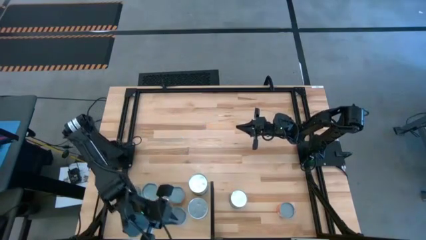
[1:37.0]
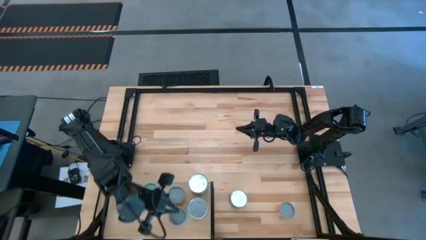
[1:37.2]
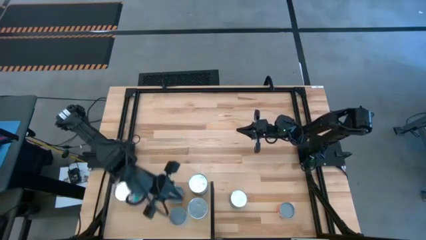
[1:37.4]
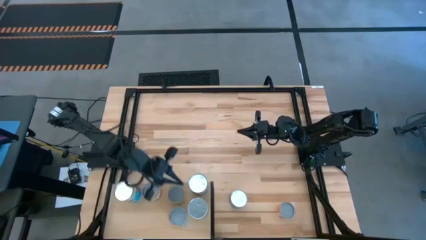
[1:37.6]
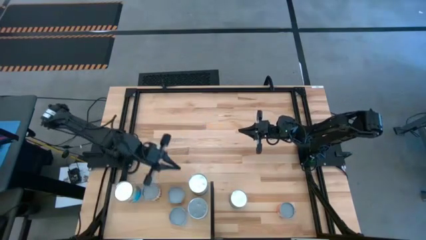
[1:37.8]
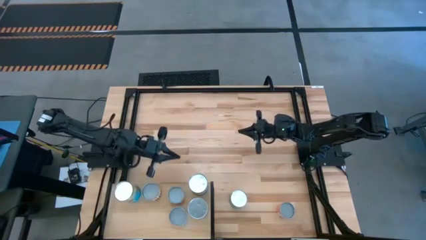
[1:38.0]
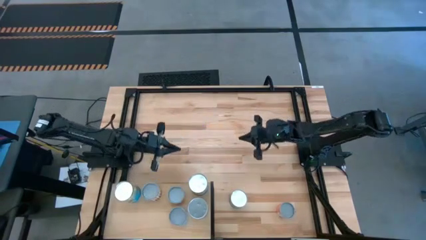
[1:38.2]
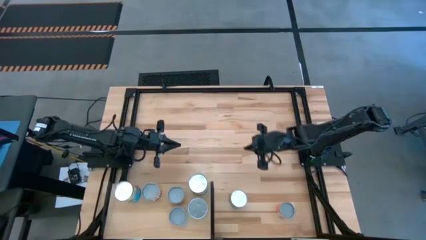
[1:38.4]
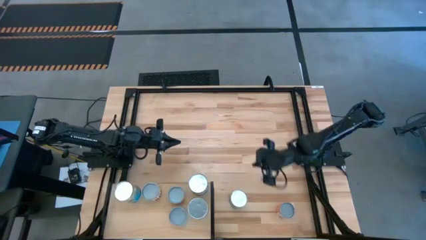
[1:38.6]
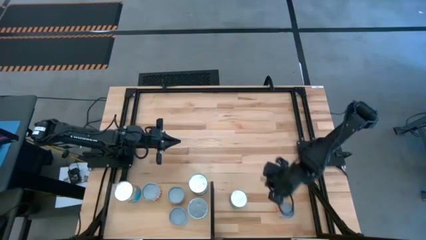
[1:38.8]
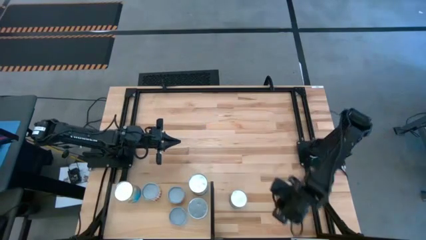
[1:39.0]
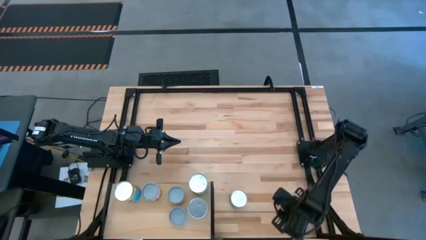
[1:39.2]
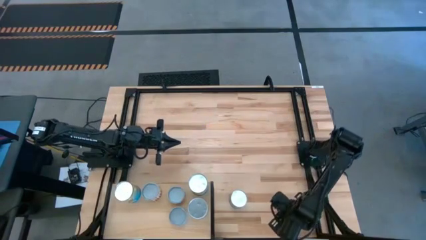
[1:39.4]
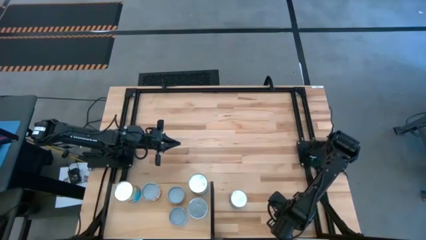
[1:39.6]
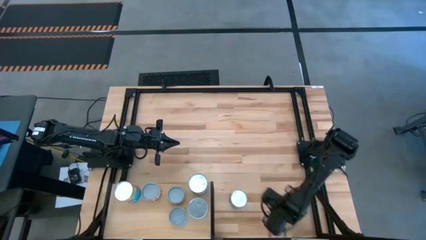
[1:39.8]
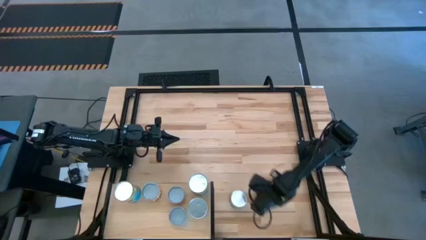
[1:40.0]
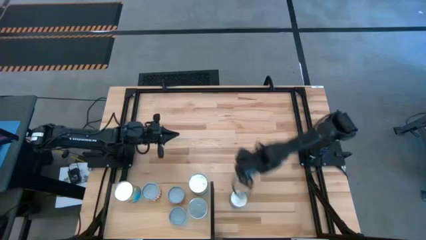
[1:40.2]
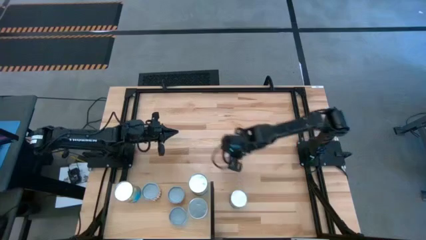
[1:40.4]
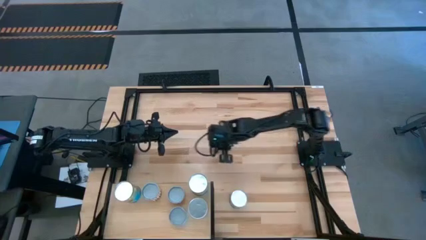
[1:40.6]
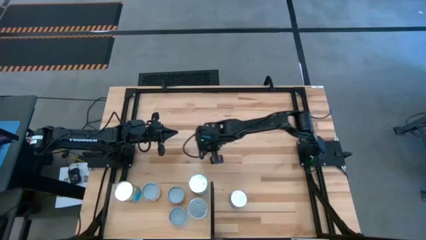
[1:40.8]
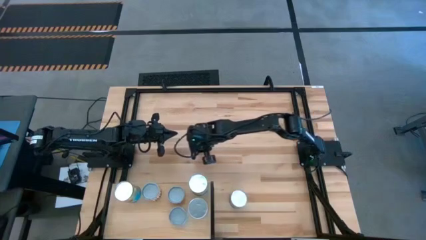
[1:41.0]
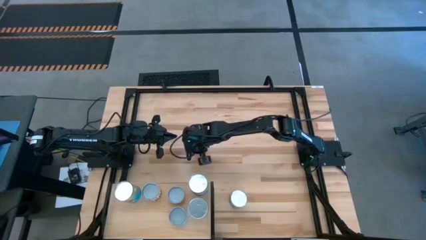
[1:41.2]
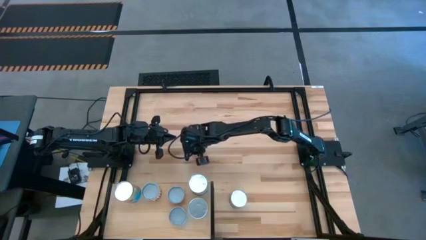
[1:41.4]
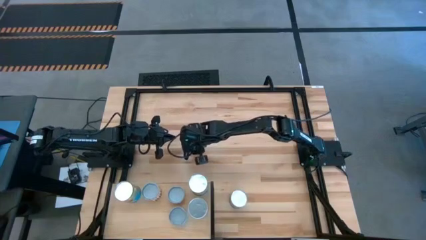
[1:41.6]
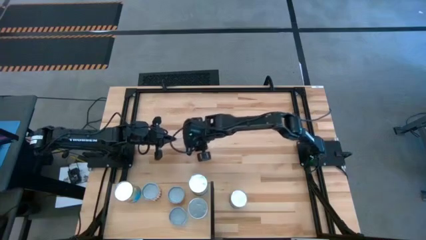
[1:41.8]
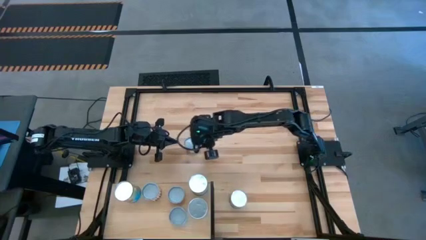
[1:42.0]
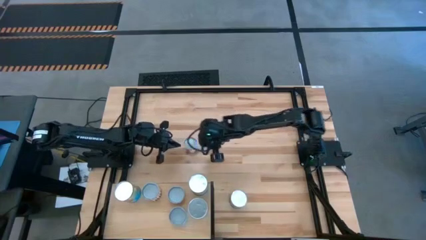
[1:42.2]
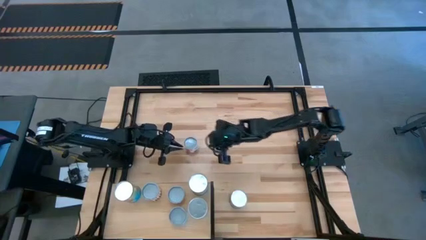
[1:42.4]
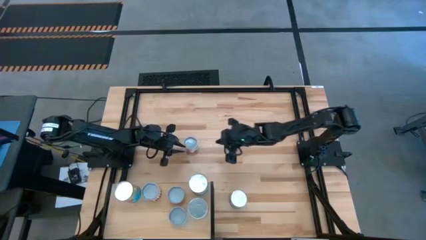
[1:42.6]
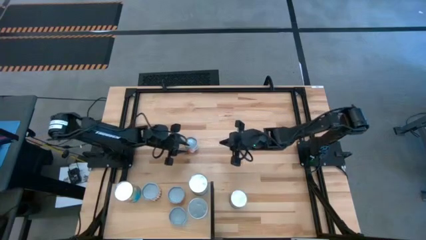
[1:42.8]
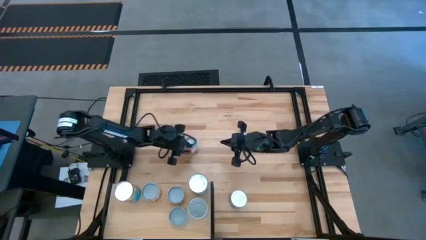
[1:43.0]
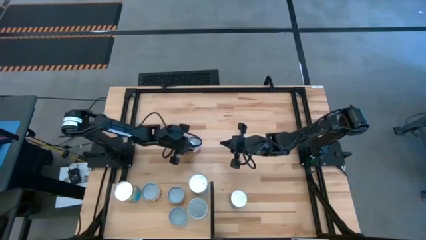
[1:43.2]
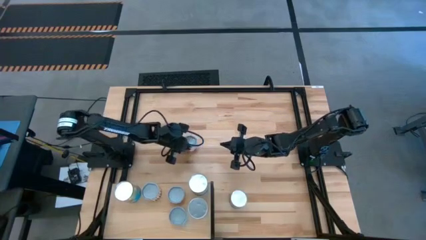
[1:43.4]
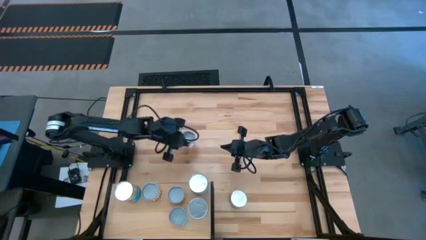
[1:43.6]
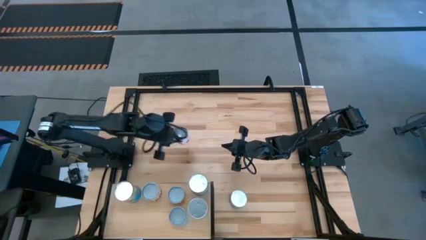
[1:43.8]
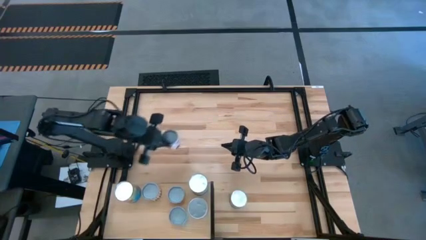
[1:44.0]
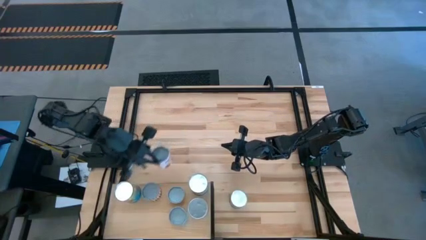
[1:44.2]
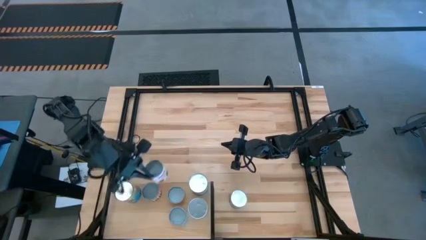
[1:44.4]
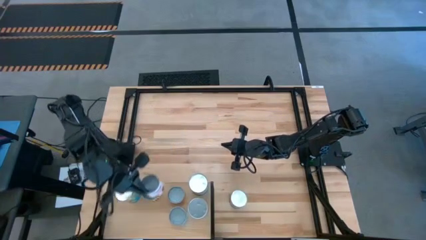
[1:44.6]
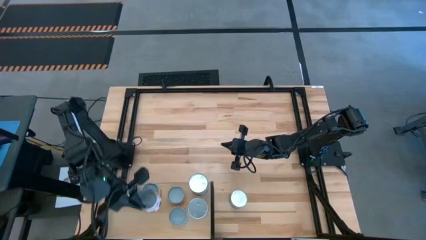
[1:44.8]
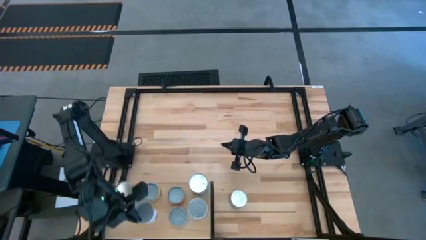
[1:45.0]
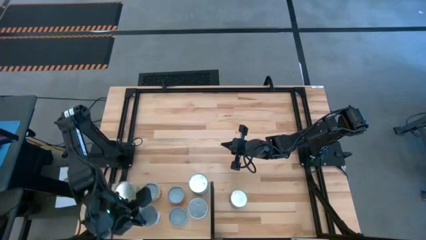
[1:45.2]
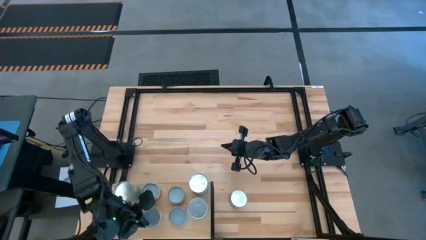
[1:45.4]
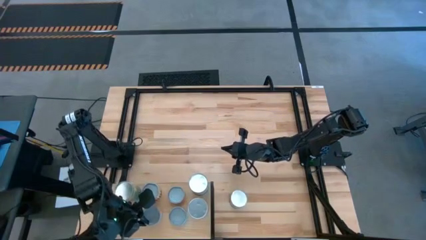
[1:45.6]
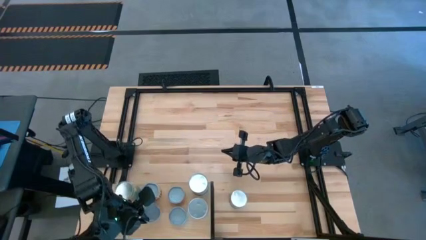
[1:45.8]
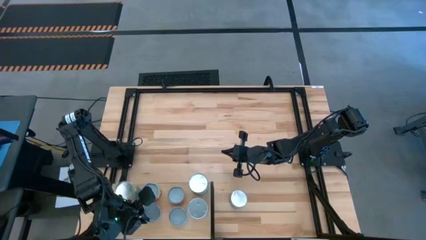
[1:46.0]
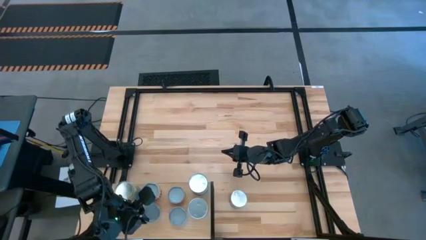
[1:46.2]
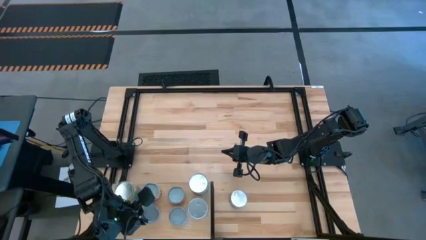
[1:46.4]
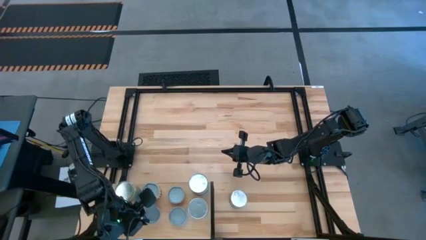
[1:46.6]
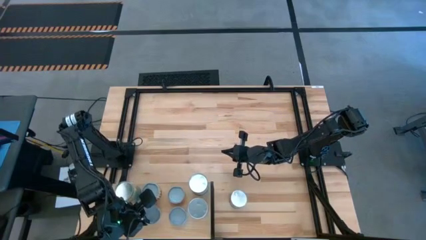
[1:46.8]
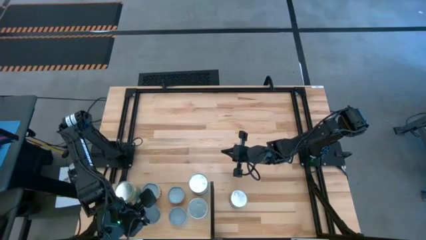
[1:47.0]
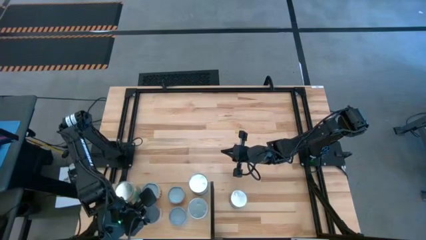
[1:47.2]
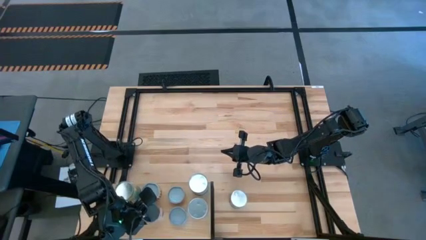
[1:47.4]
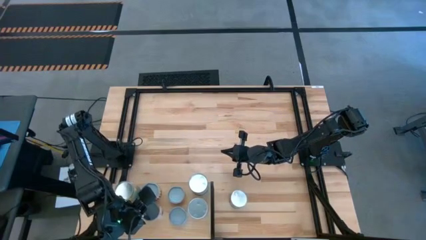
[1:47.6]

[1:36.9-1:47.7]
Task: Pick and place cans onto a shelf
Put the canned meatballs on the shelf
